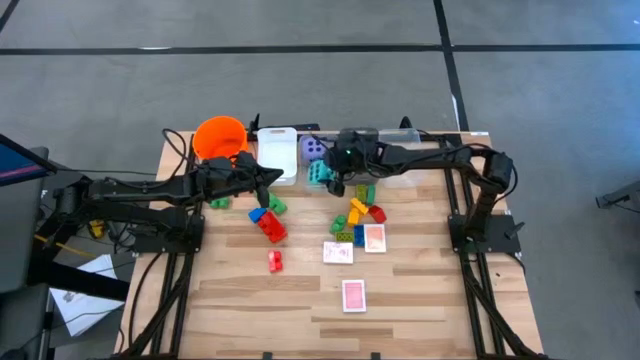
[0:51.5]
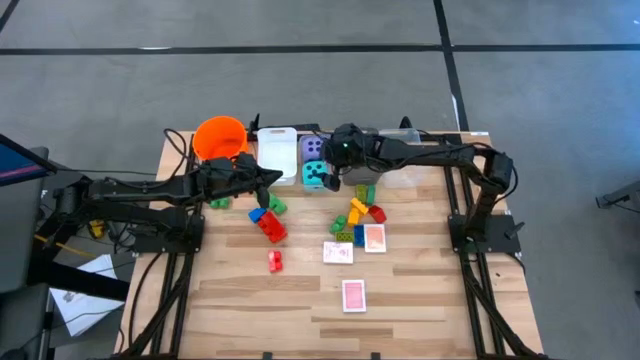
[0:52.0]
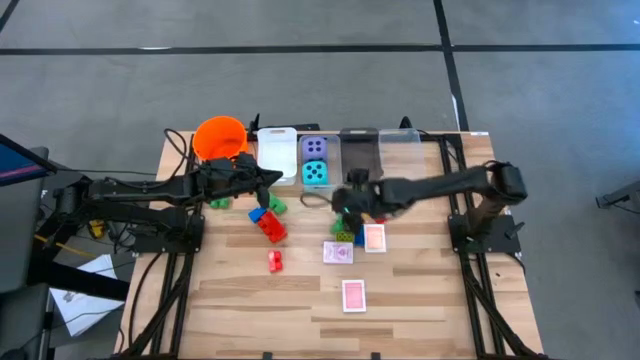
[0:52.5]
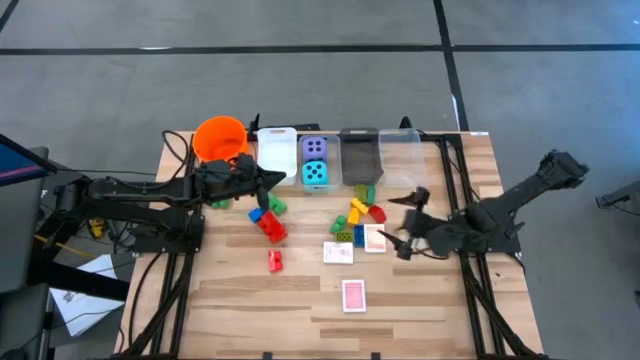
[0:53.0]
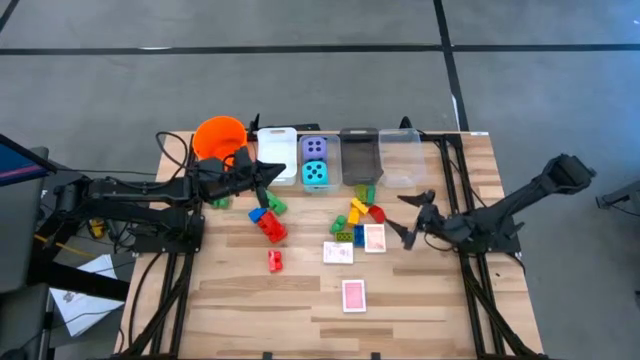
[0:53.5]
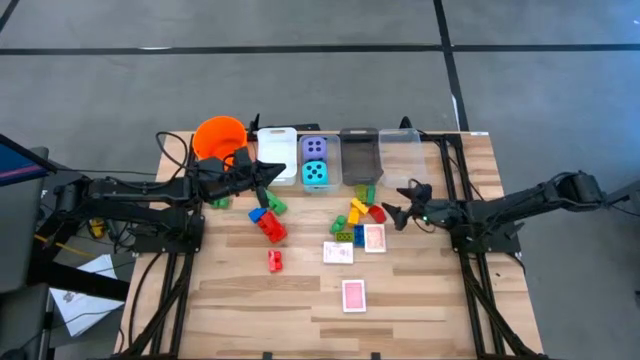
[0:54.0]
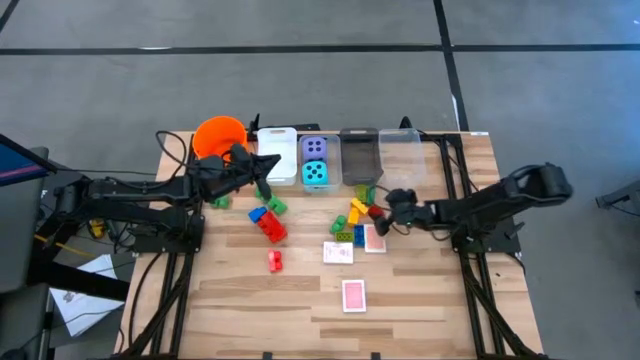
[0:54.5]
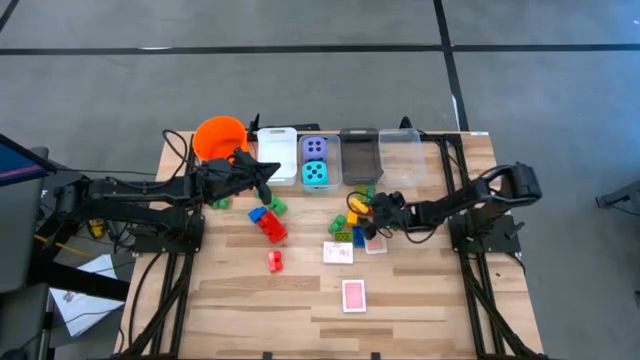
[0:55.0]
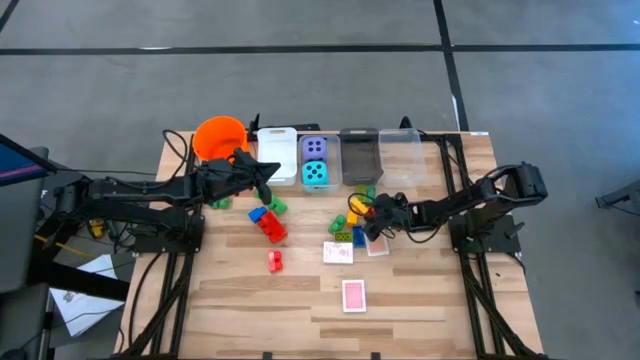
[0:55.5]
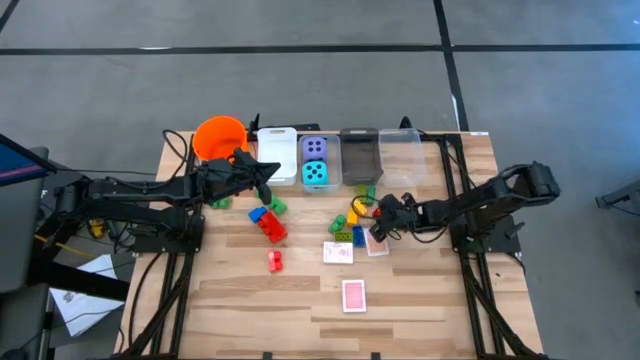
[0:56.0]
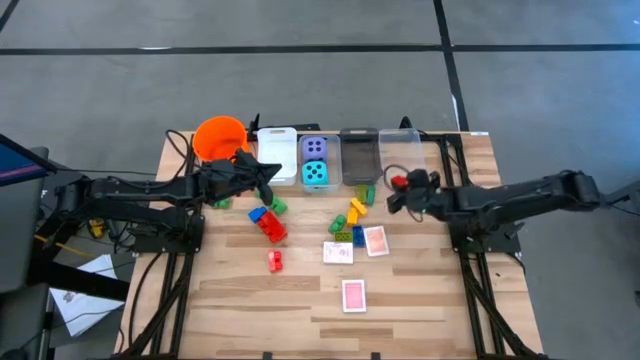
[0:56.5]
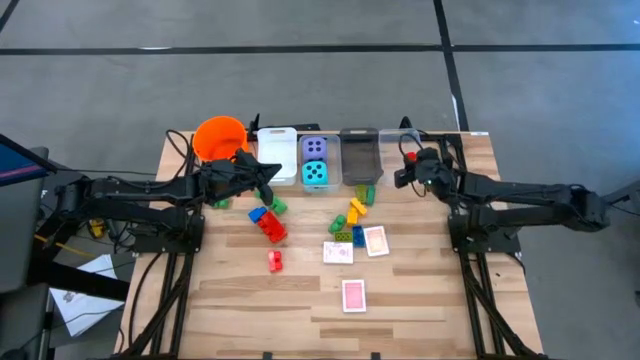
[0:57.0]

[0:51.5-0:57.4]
Task: Pick & Place Toys
Put the small red game piece into the right transparent bin

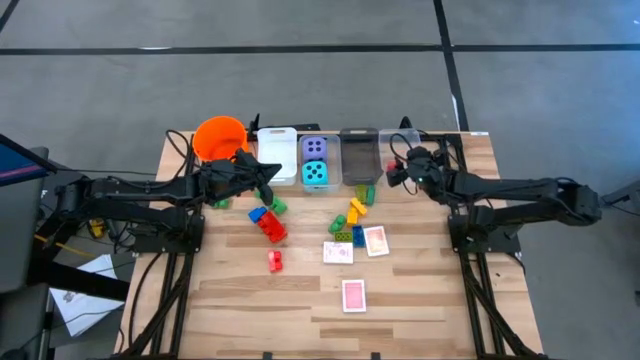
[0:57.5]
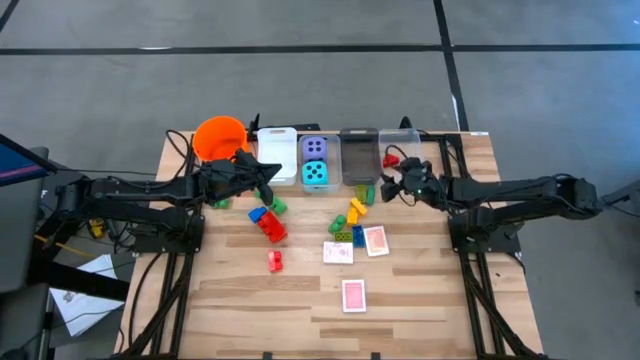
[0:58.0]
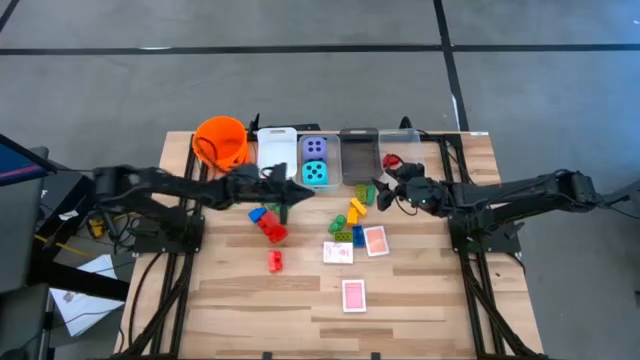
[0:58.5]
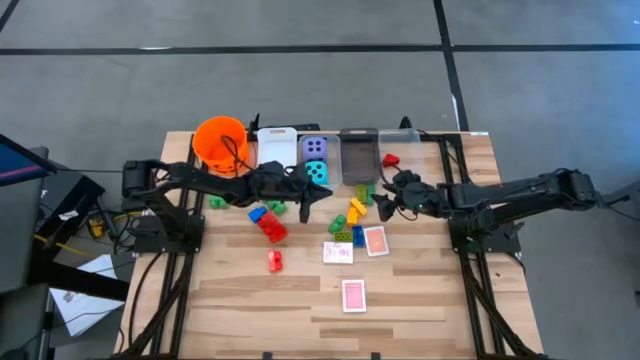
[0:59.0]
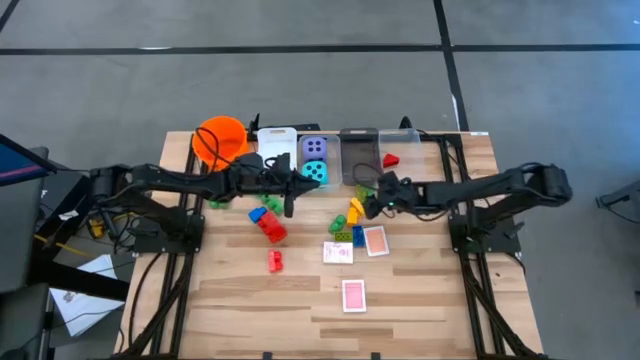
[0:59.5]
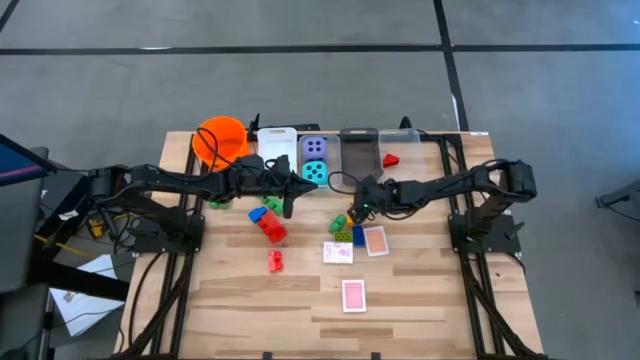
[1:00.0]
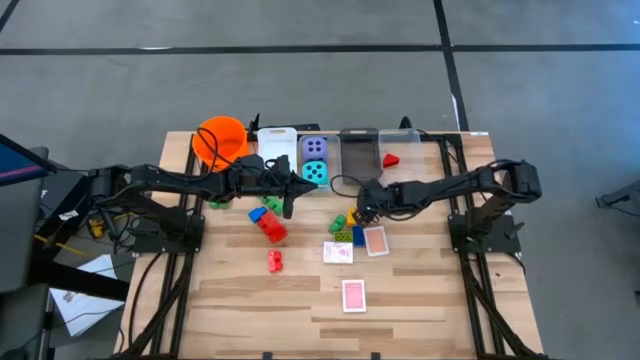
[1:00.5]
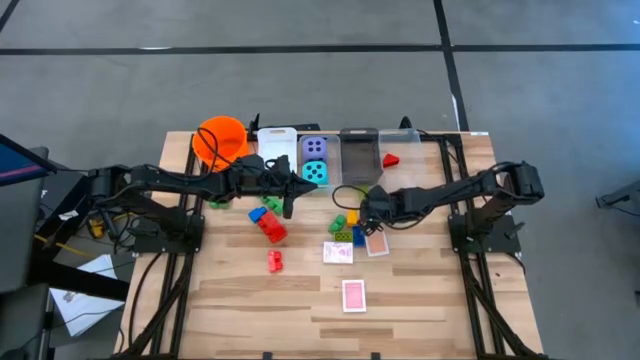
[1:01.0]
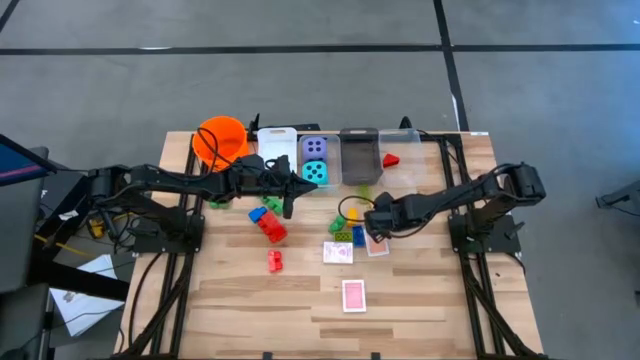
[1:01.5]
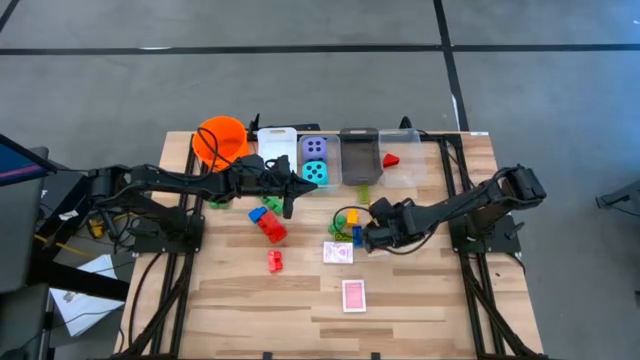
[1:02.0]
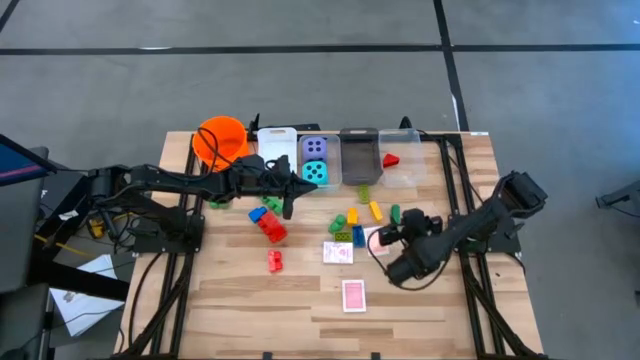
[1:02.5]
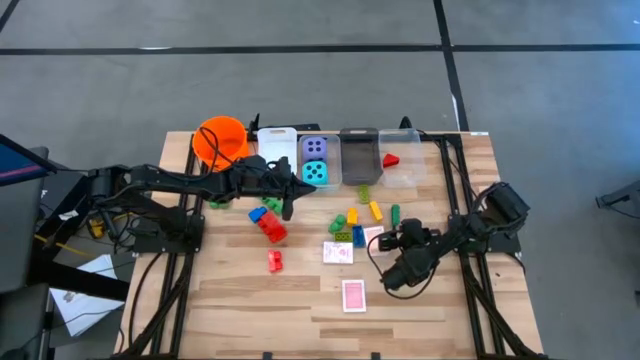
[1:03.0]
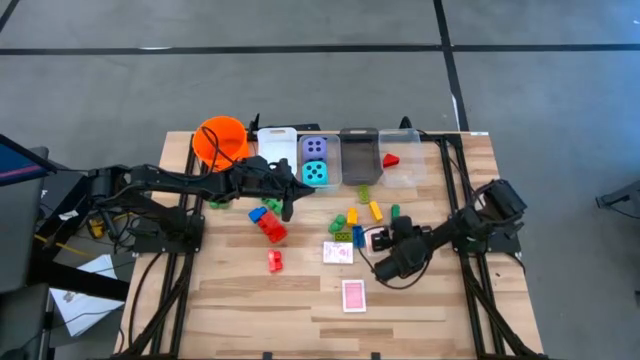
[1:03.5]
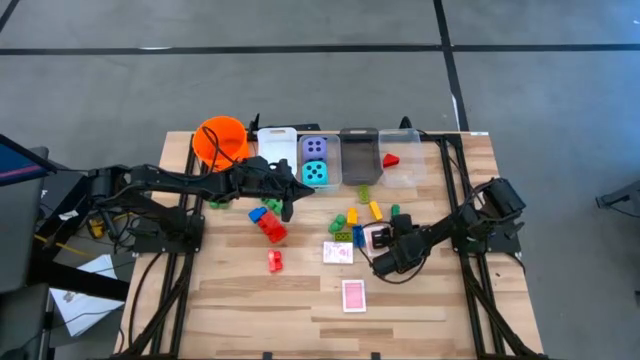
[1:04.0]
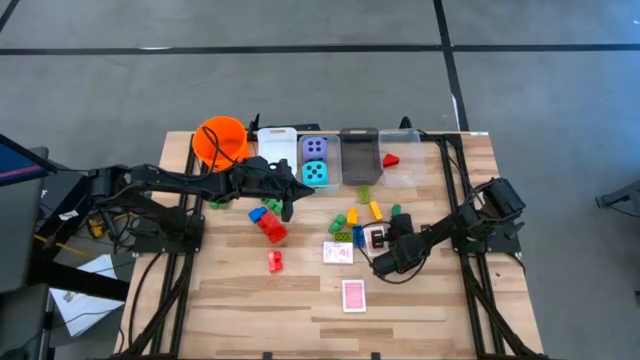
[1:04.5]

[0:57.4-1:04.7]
Put the small green game piece into the right transparent bin

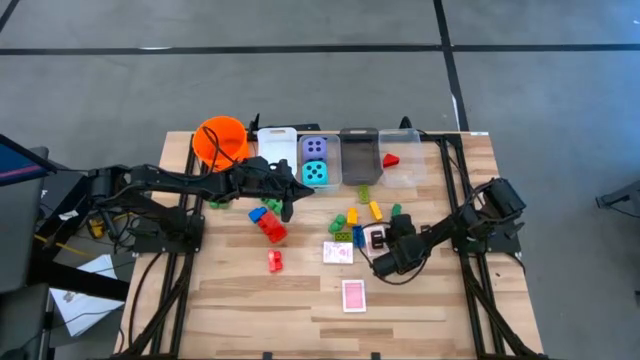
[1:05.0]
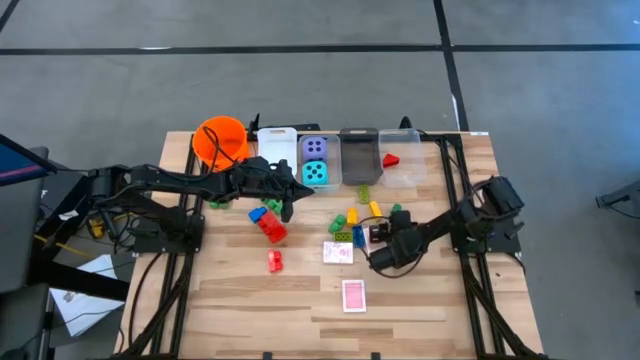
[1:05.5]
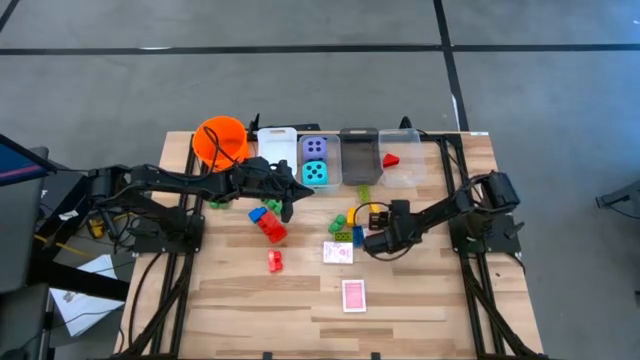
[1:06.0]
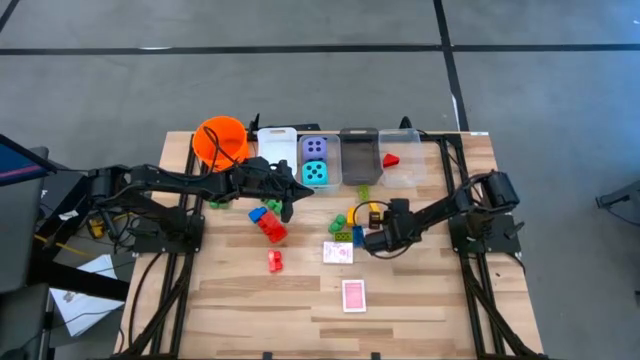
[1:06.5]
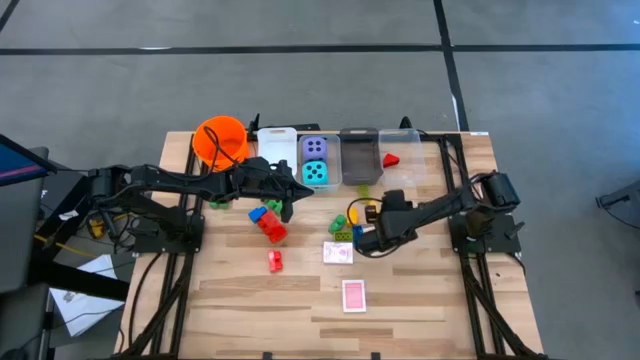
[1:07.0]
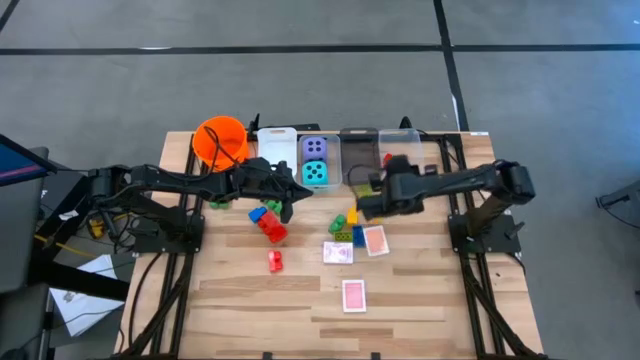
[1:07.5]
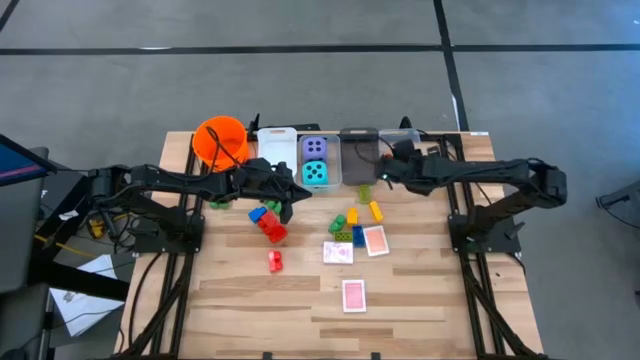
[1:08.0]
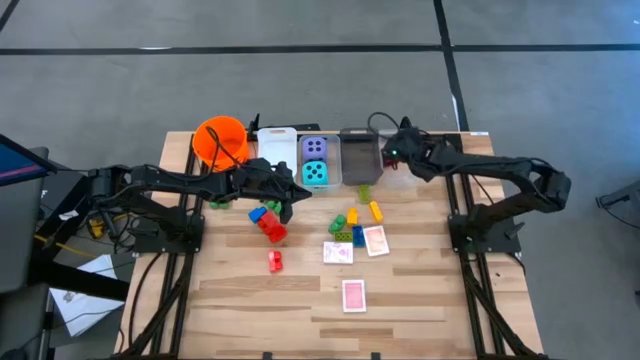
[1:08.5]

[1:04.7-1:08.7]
Put the small green game piece into the right transparent bin

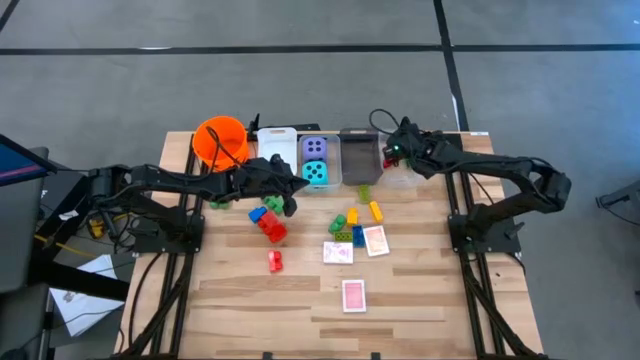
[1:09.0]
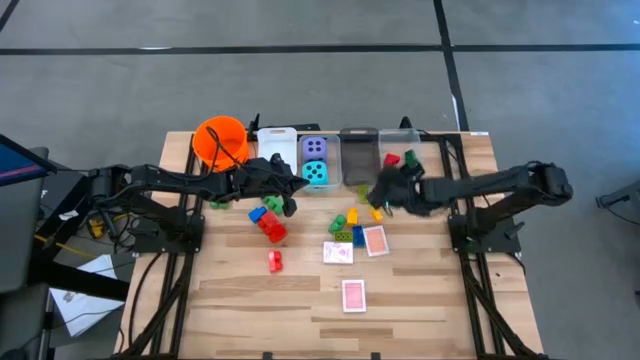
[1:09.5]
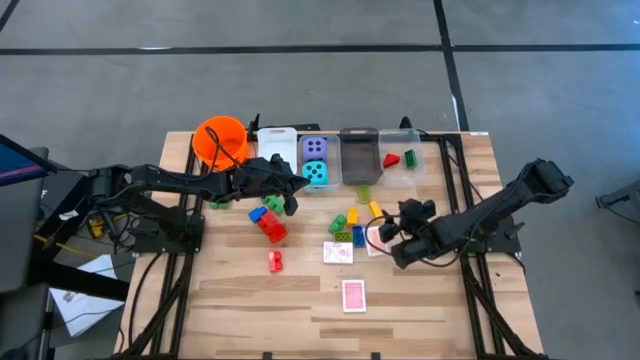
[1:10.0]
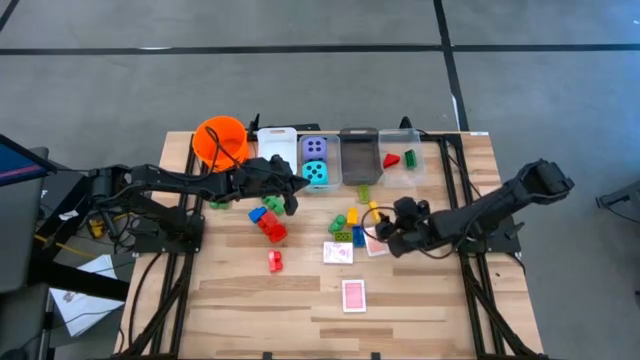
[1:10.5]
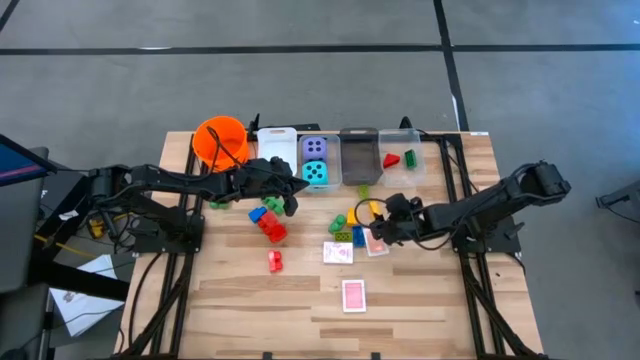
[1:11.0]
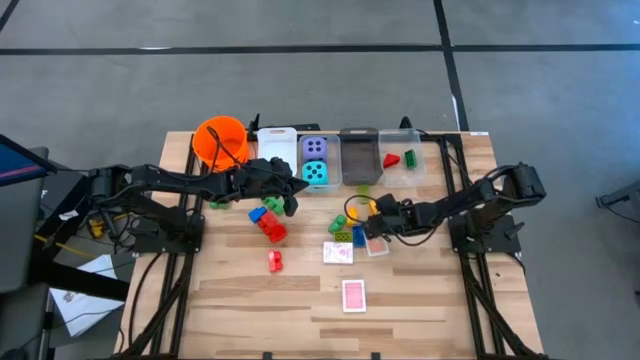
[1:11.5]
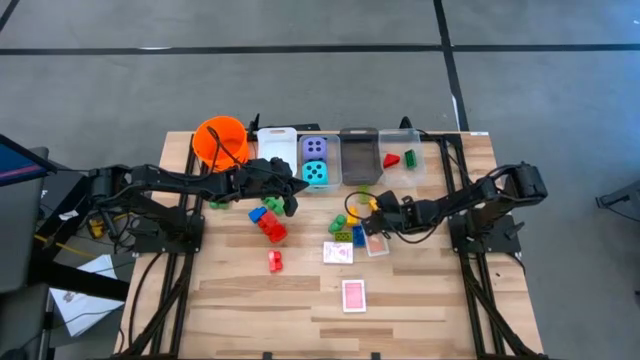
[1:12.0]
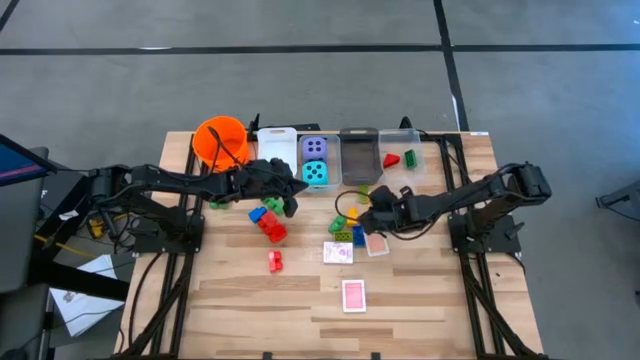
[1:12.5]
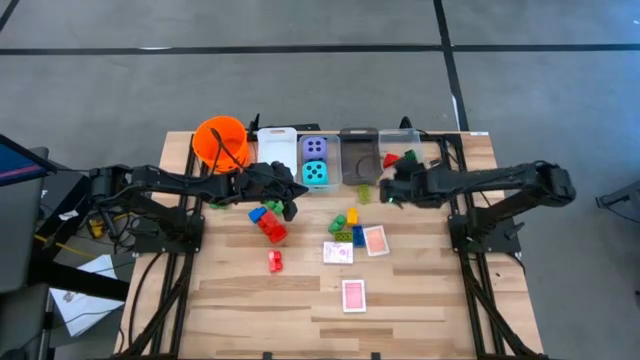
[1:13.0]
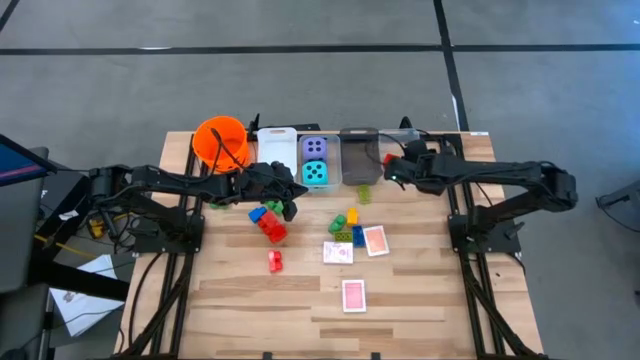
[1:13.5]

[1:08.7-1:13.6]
Put the small yellow game piece into the right transparent bin
